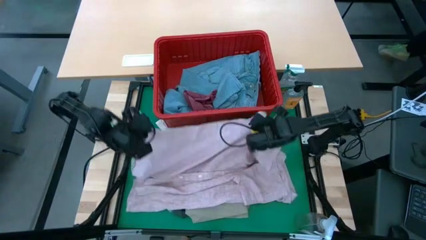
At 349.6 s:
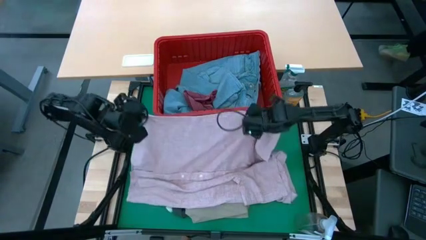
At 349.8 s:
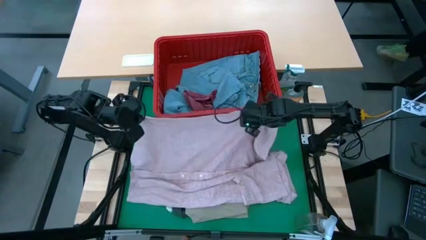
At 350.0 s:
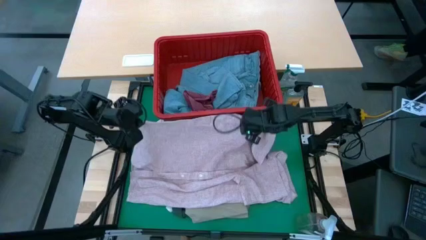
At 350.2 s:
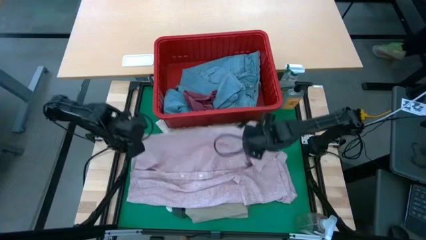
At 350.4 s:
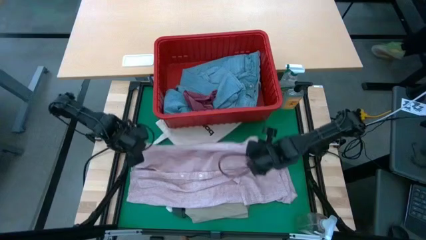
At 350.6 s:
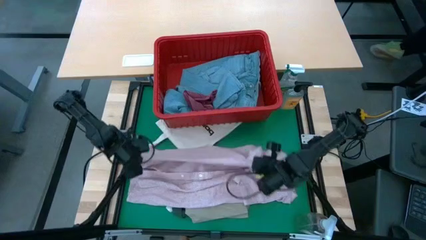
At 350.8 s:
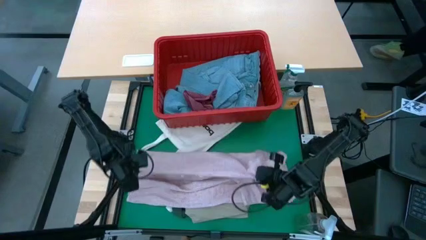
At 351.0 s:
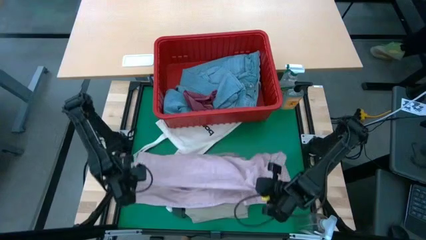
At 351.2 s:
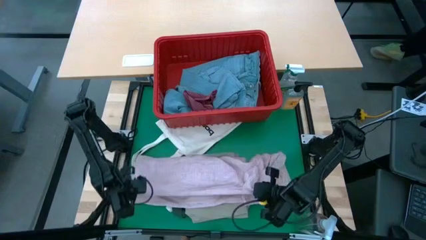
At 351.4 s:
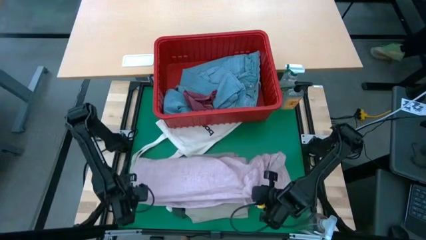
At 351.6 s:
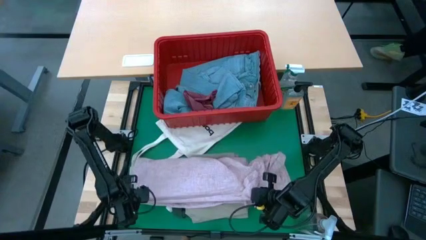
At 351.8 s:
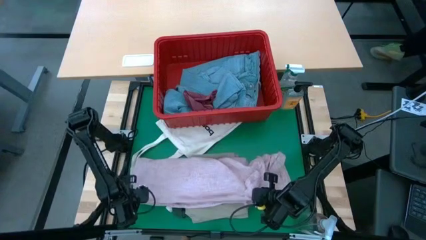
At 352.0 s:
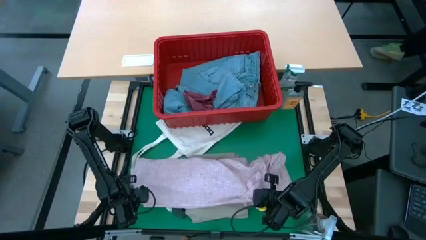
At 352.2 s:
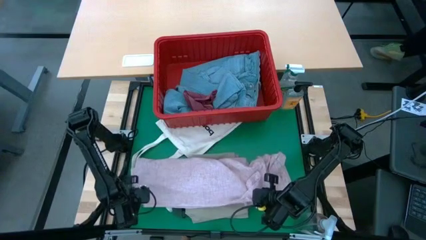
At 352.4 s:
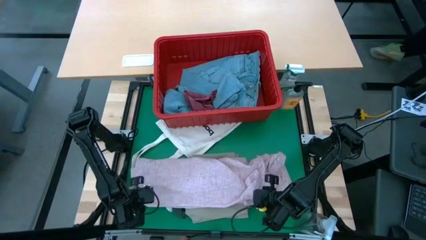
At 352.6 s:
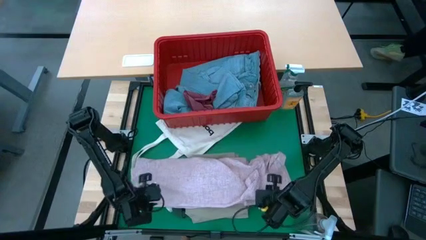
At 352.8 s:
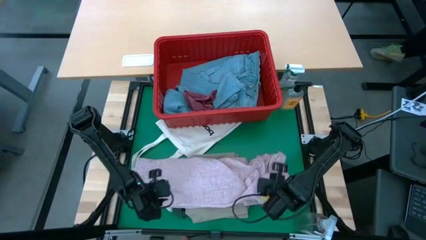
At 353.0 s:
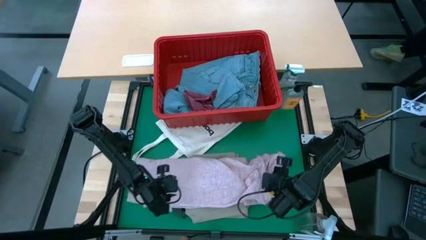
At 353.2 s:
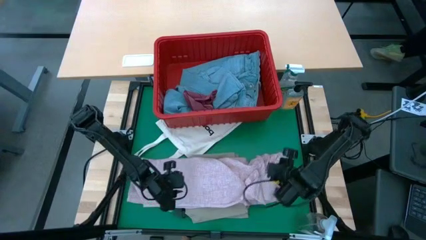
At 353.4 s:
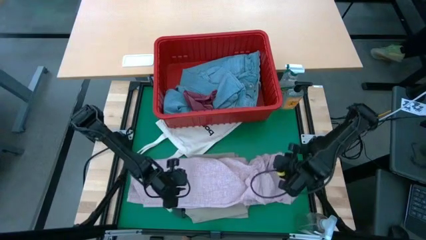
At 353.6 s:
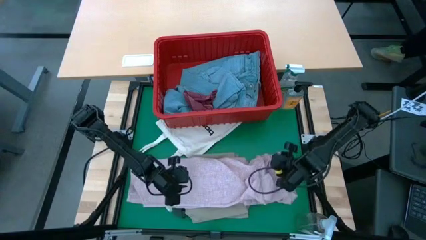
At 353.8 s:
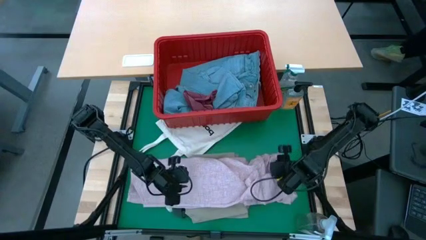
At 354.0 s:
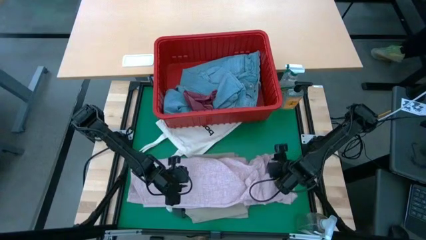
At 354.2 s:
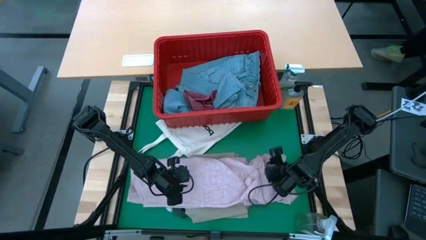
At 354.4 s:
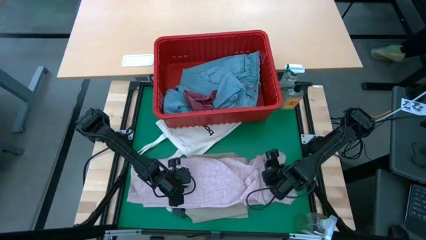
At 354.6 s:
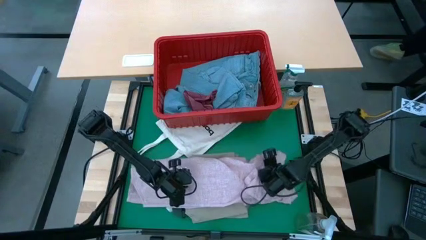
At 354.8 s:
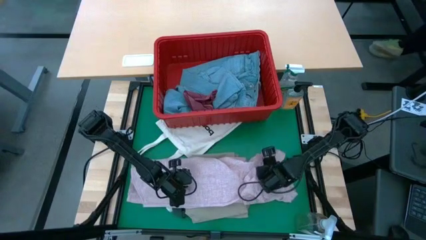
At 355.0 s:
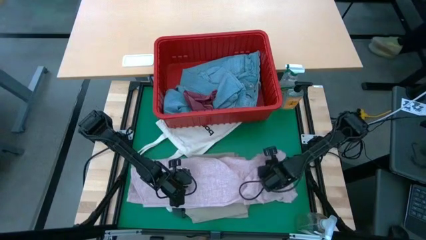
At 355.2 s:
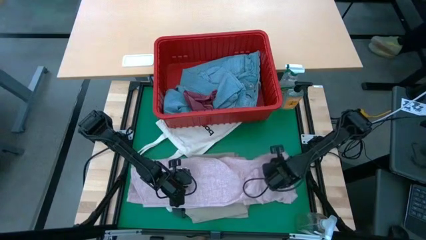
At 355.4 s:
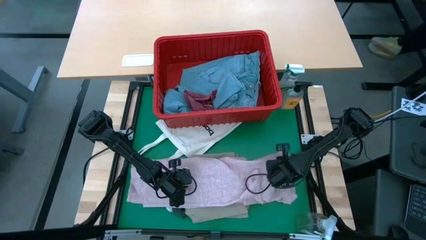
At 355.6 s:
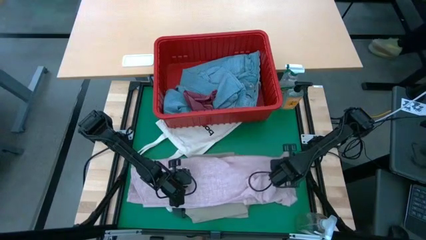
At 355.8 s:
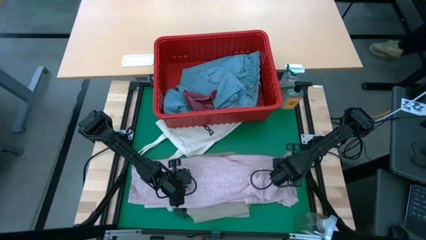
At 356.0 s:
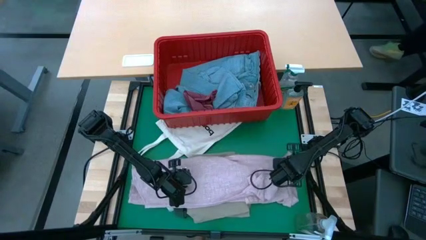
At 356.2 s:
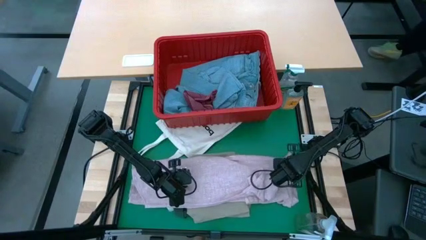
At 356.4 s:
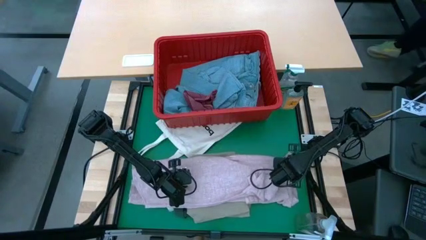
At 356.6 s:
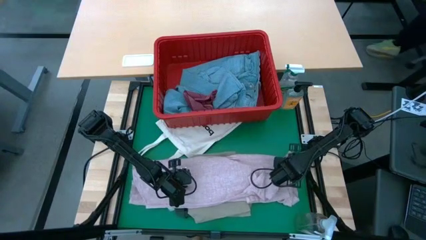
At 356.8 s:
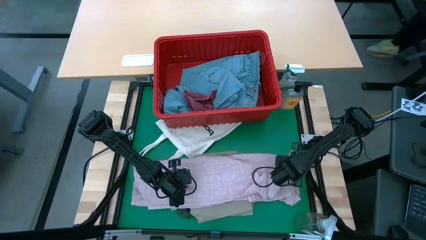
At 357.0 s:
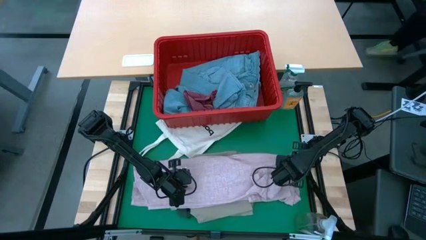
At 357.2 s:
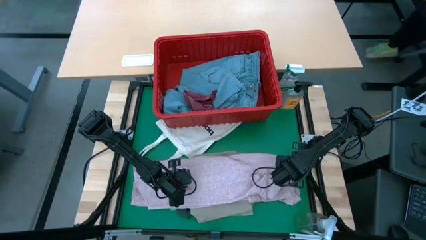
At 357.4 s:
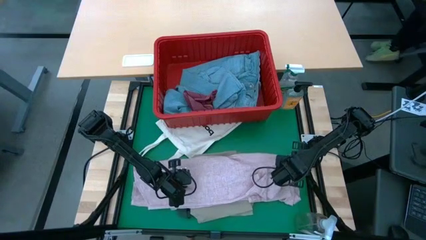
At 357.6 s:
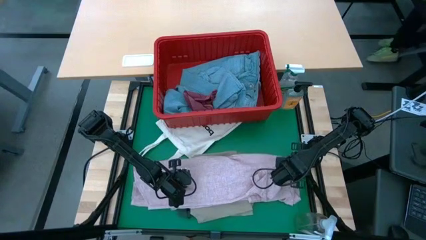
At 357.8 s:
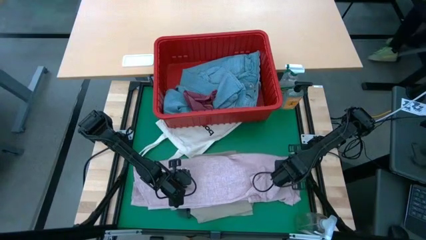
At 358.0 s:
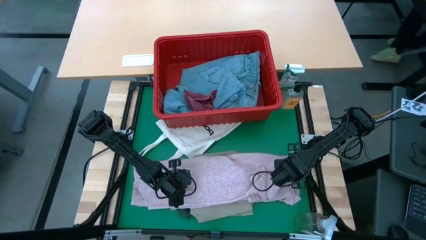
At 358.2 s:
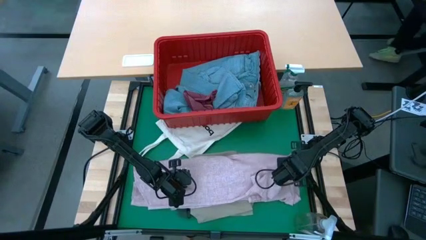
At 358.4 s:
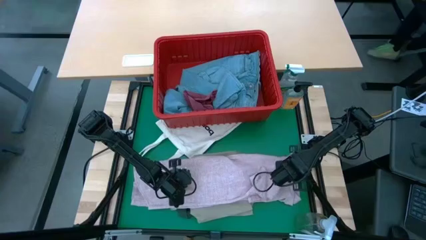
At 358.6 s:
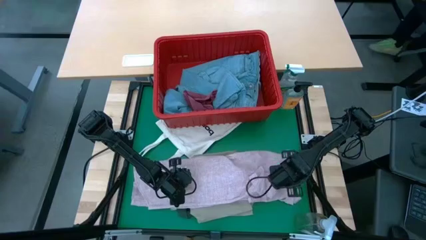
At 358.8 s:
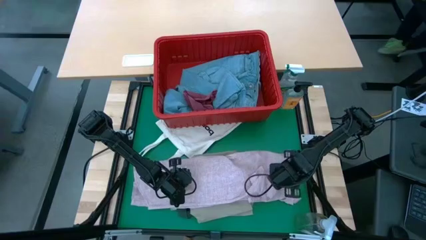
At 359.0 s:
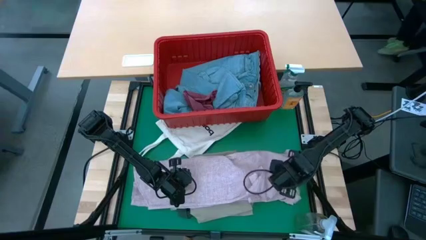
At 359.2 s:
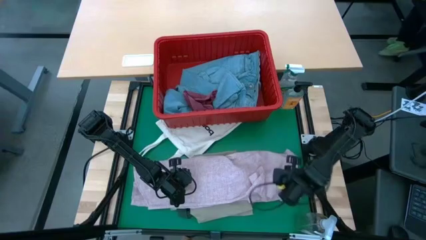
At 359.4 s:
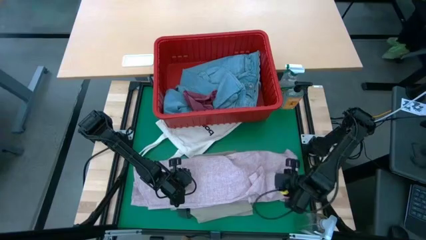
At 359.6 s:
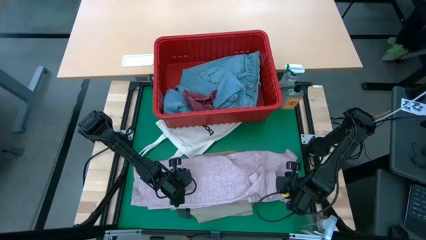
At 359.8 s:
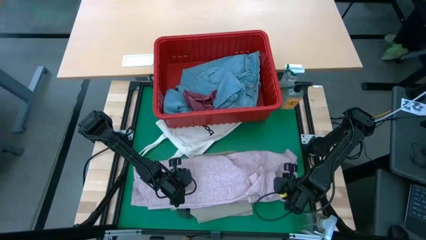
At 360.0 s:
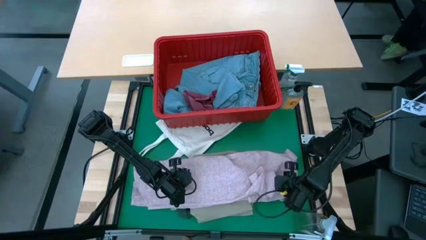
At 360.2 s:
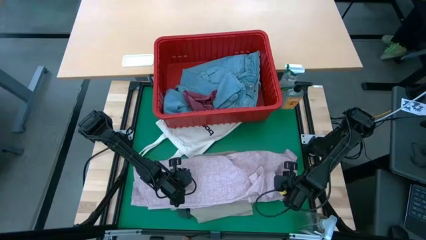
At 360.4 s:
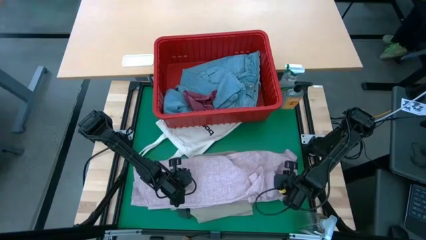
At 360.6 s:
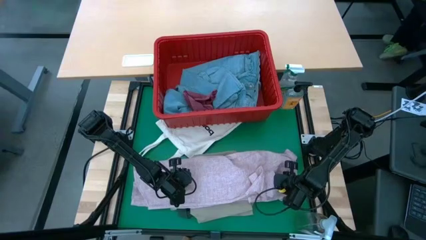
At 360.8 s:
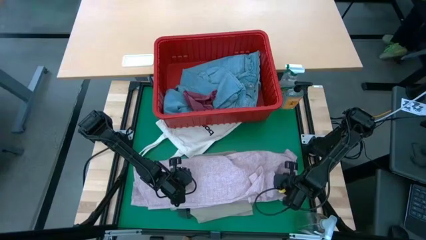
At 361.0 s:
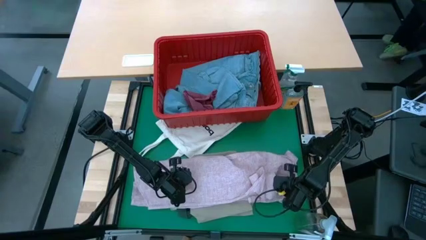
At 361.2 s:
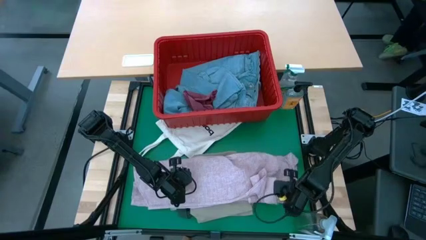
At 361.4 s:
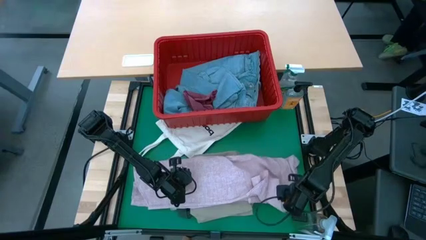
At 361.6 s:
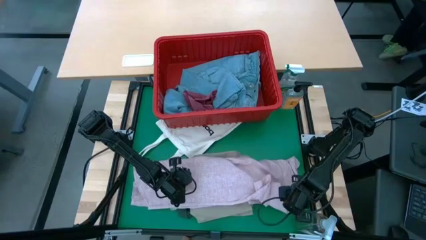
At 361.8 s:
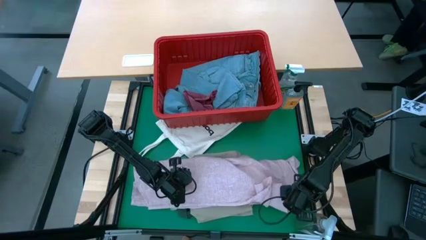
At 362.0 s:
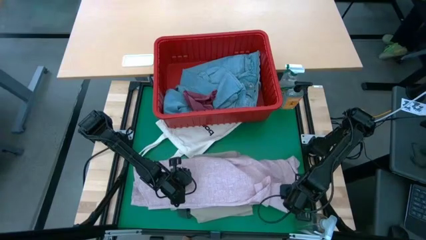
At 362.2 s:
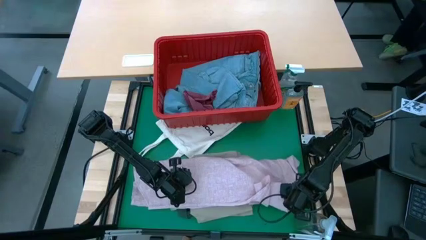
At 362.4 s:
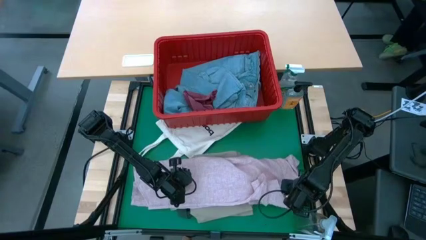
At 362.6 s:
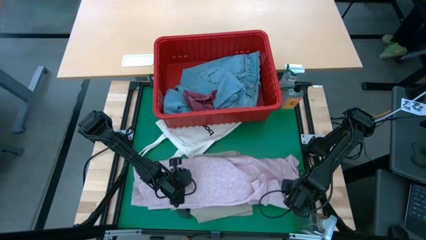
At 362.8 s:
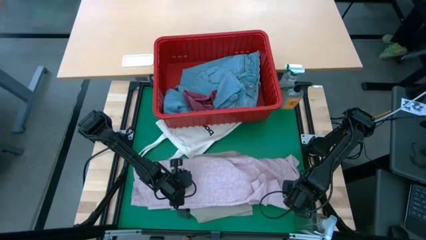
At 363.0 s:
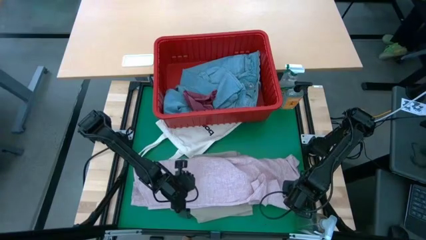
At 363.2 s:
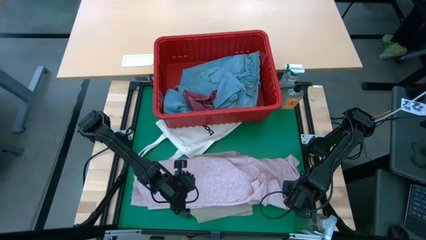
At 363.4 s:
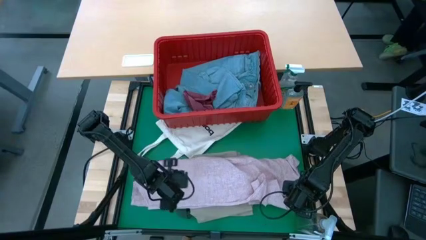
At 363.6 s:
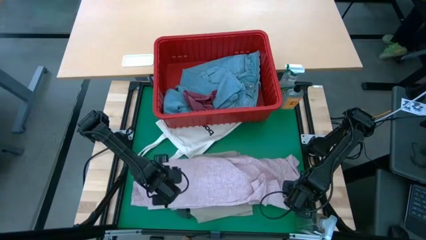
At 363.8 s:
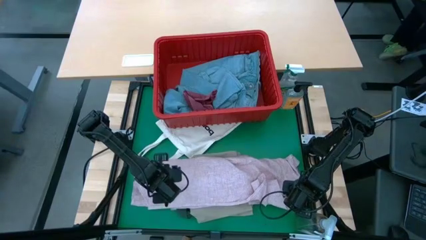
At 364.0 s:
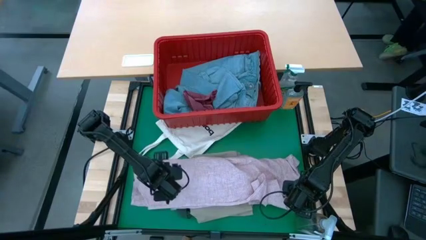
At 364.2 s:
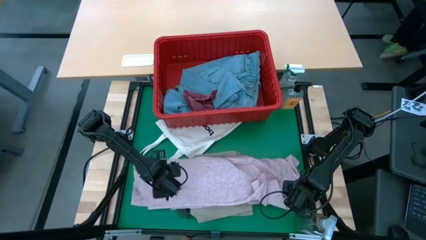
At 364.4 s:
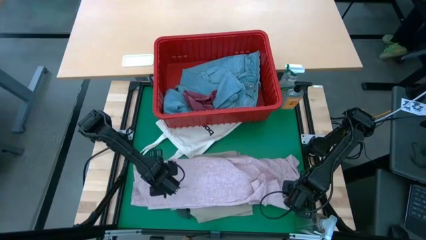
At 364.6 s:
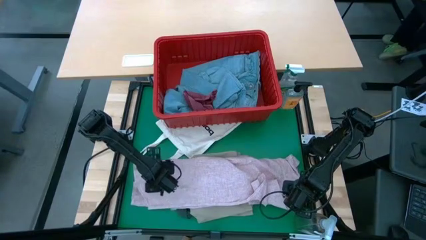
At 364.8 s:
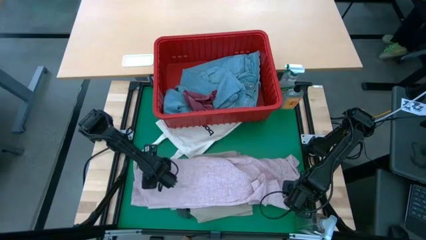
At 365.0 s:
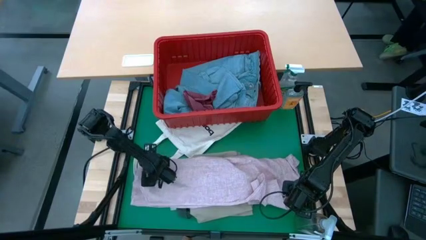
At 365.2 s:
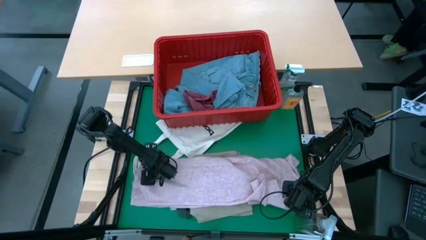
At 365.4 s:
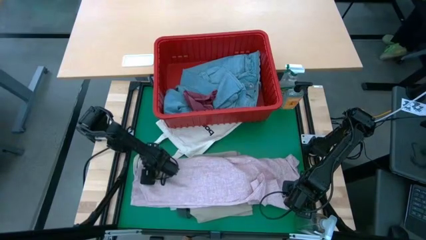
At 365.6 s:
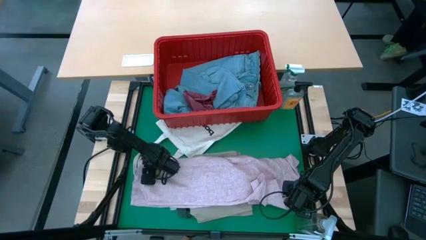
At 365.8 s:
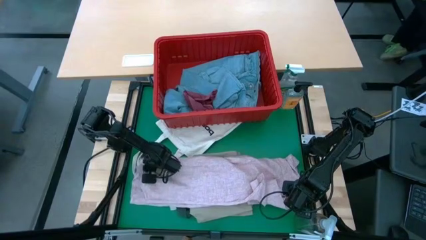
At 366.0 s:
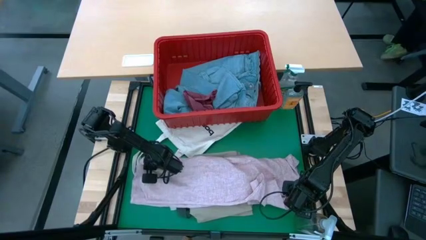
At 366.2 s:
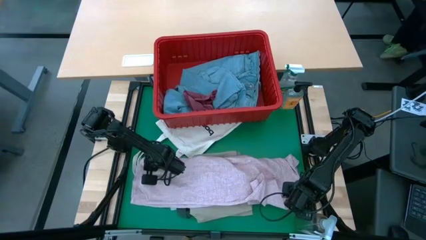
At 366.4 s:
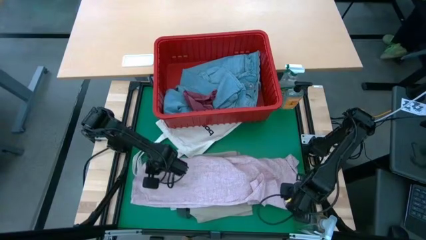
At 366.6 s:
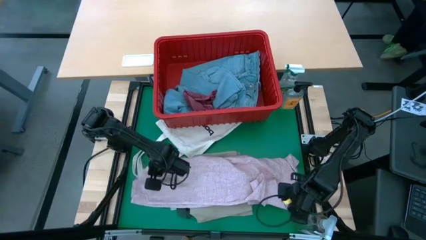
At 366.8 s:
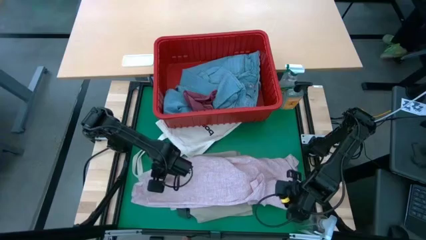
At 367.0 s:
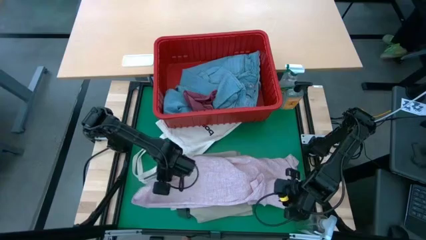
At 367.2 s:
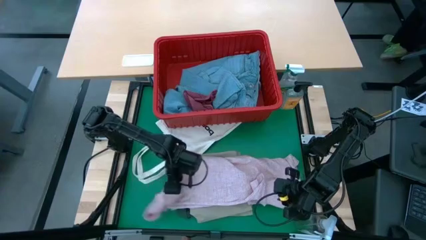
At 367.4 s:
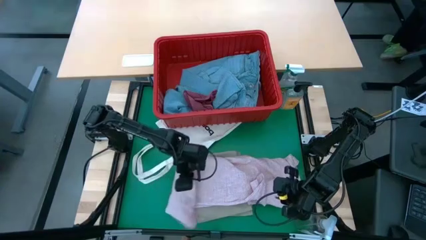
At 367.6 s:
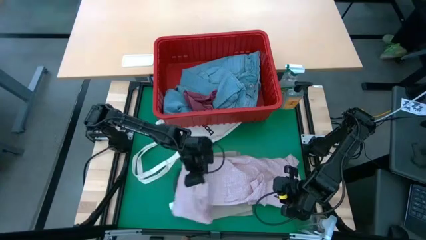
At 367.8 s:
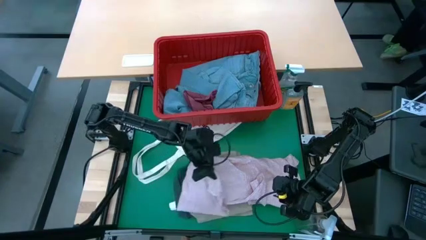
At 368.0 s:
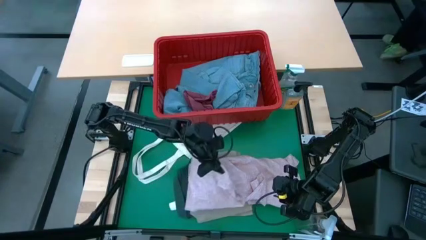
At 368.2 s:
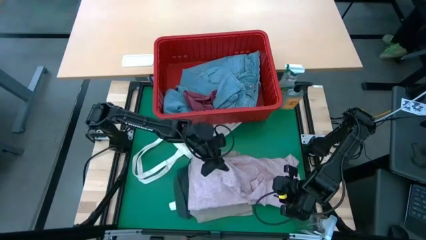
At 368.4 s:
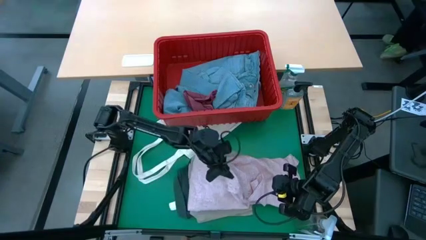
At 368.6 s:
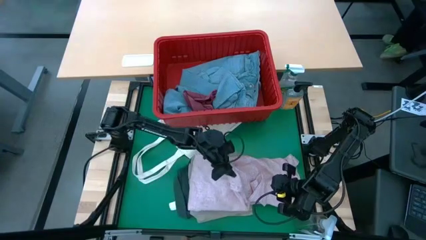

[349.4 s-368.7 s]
Task: Fold laundry
Fold the pink shirt
